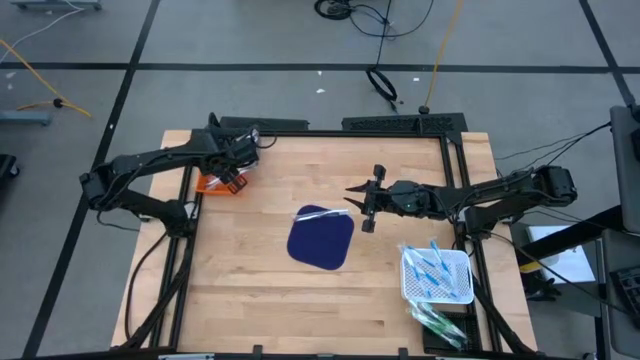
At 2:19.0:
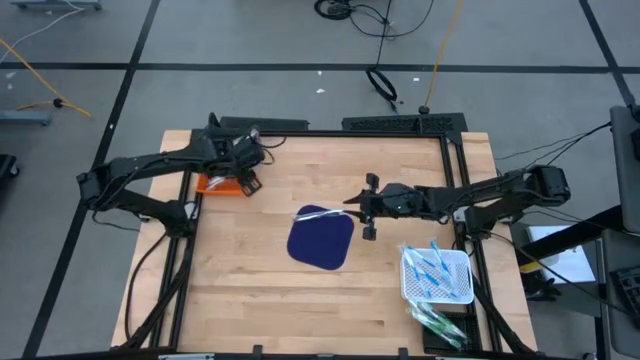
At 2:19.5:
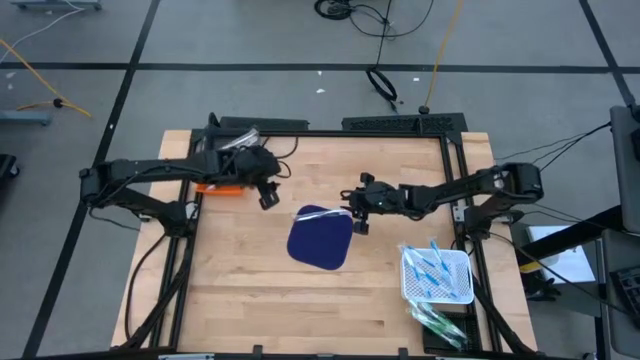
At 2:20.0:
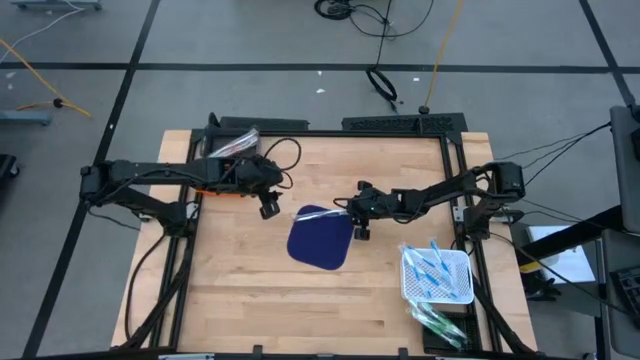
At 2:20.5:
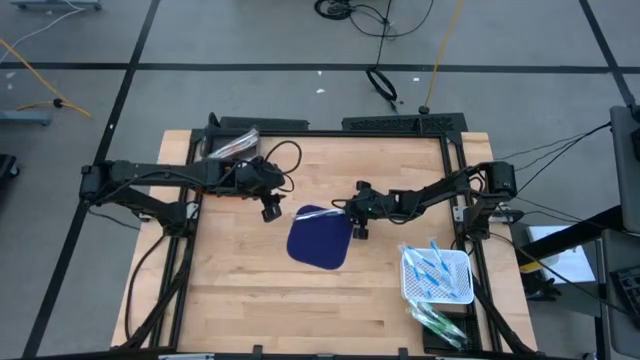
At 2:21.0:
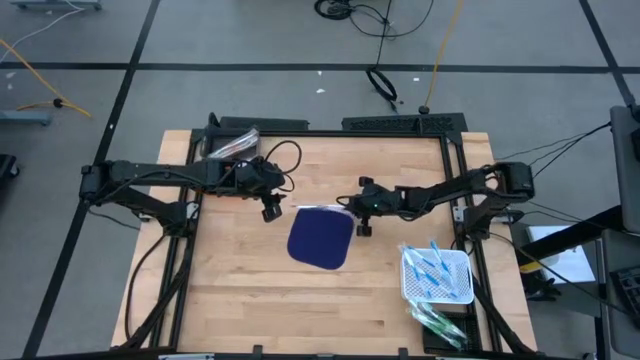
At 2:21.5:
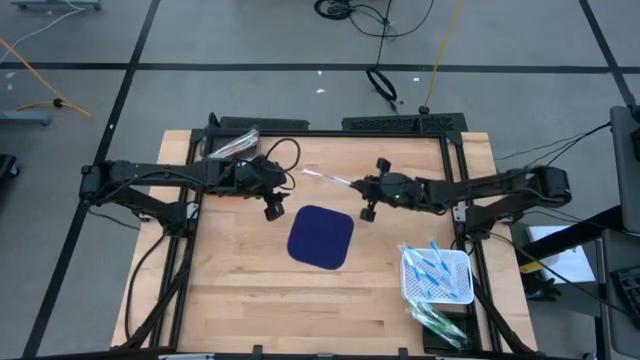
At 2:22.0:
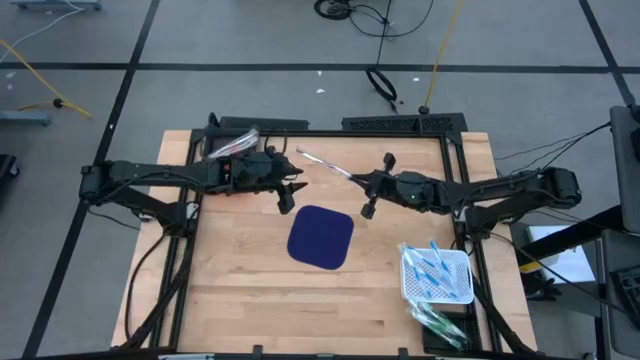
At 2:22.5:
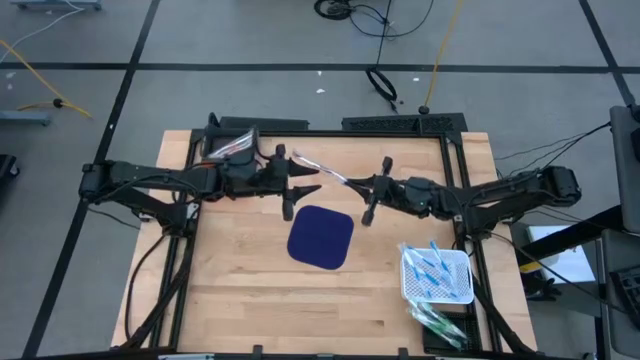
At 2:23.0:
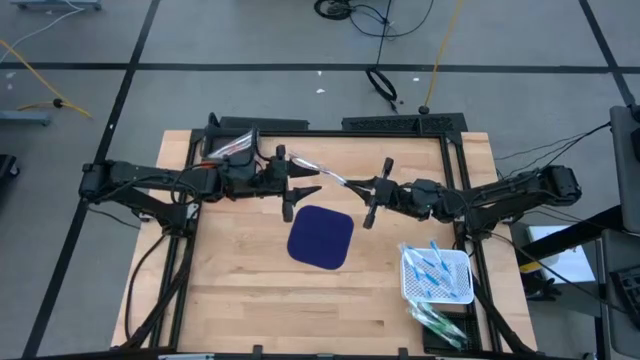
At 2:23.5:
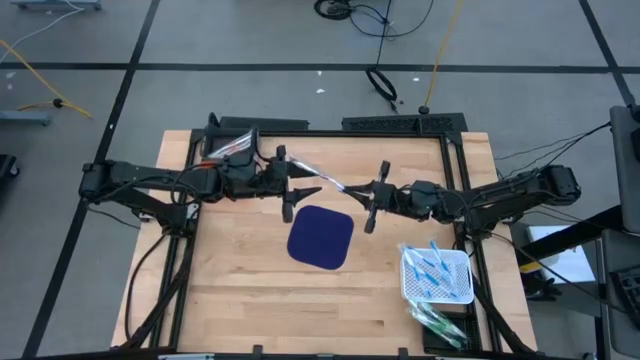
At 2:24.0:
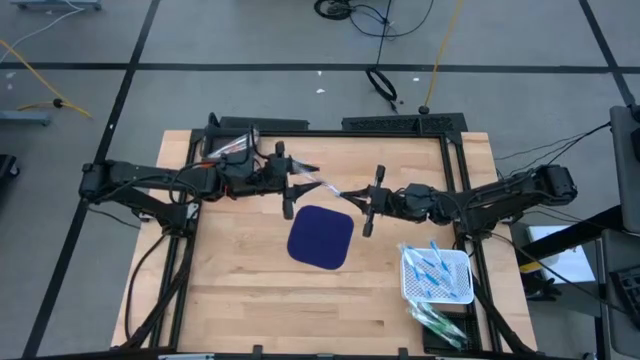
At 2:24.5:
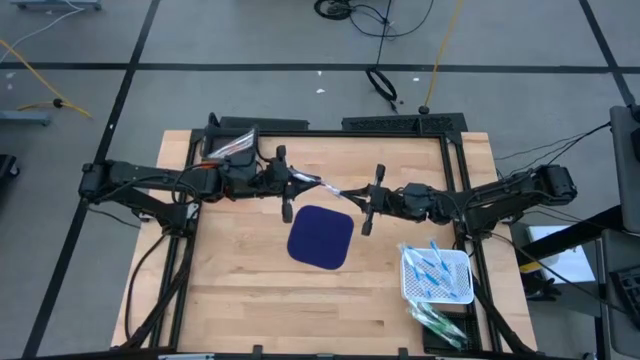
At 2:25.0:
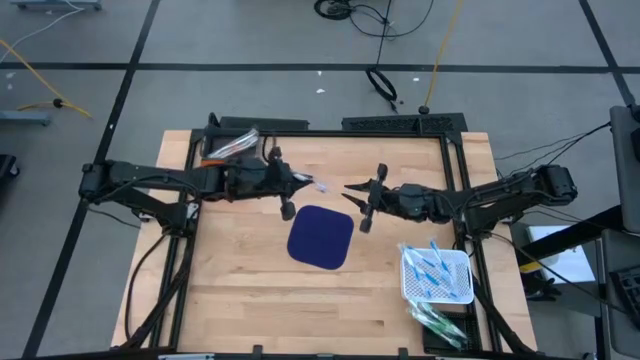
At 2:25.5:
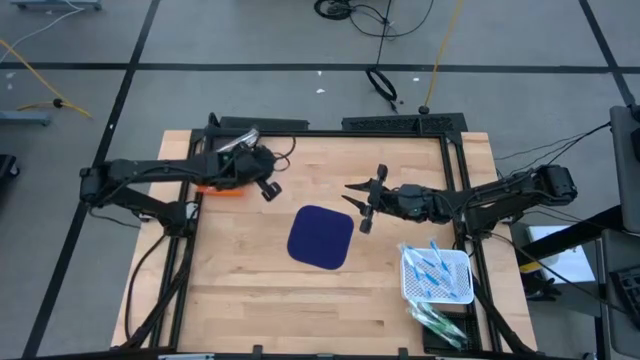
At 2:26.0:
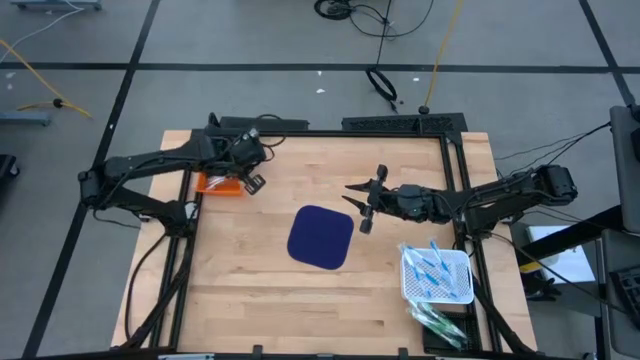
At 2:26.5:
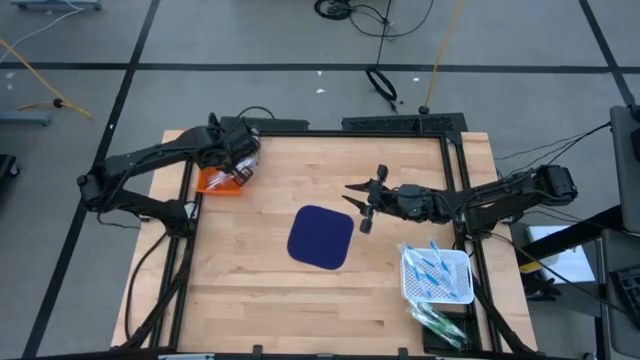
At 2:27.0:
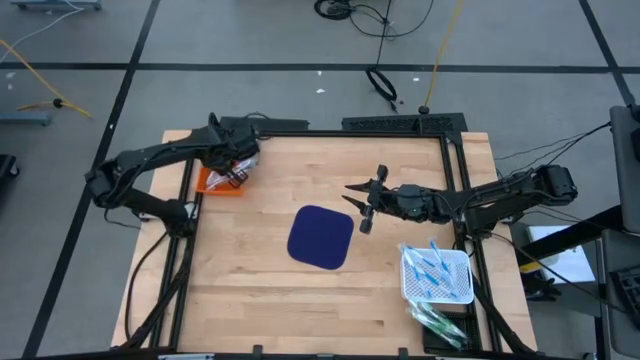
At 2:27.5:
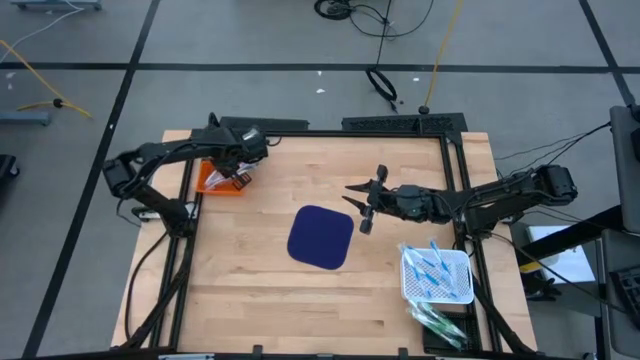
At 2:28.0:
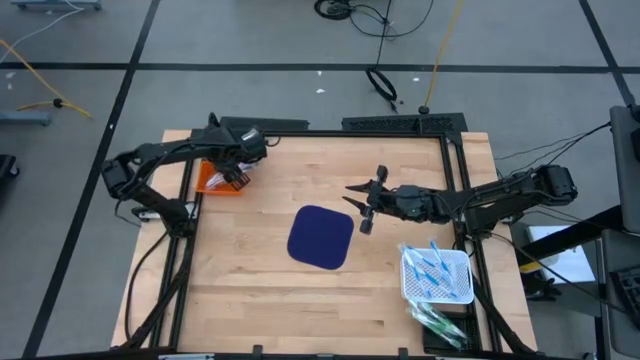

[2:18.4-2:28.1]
Task: Pick & Place Toothbrushes
Put the purple toothbrush into the orange bin

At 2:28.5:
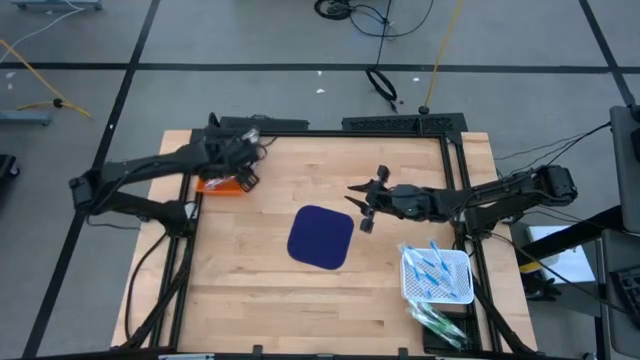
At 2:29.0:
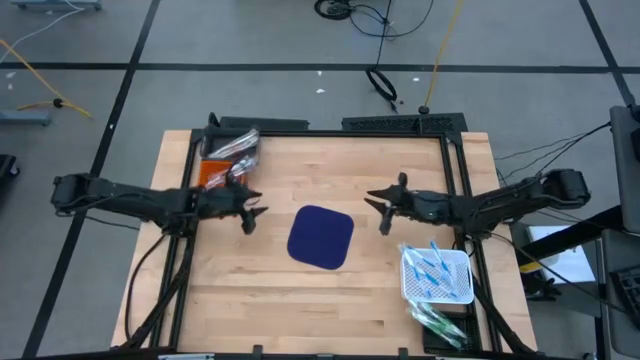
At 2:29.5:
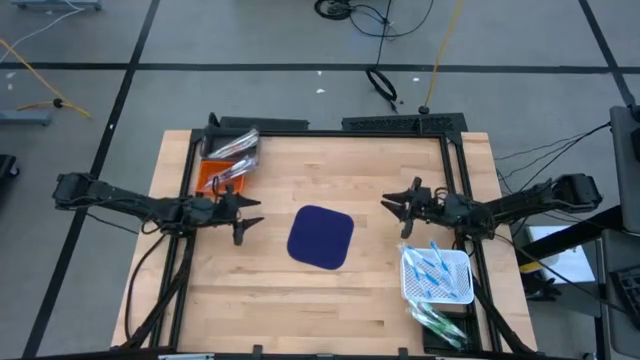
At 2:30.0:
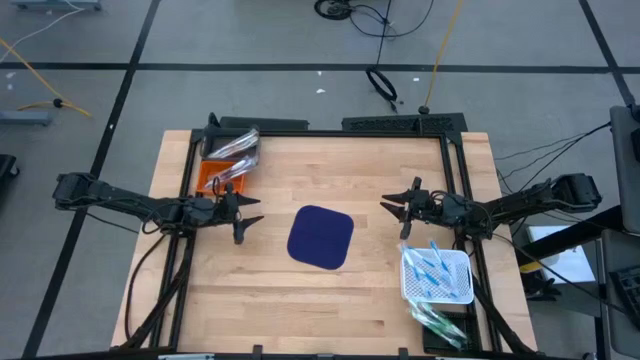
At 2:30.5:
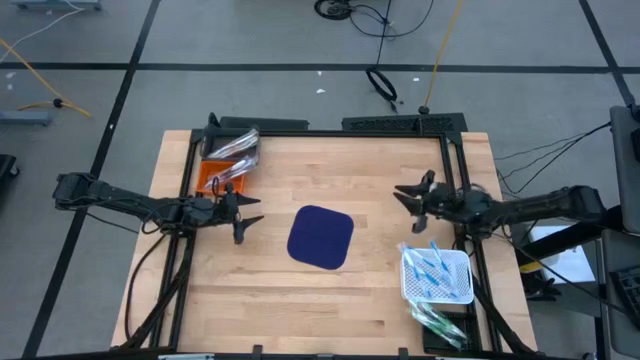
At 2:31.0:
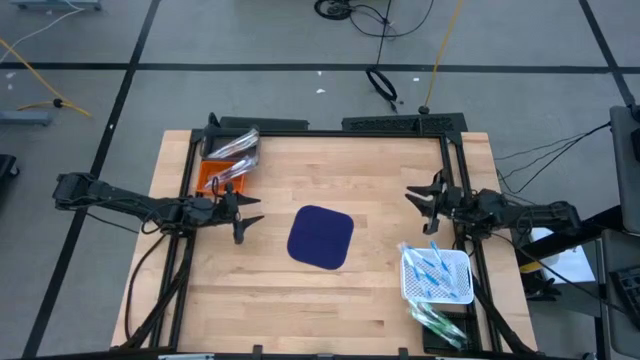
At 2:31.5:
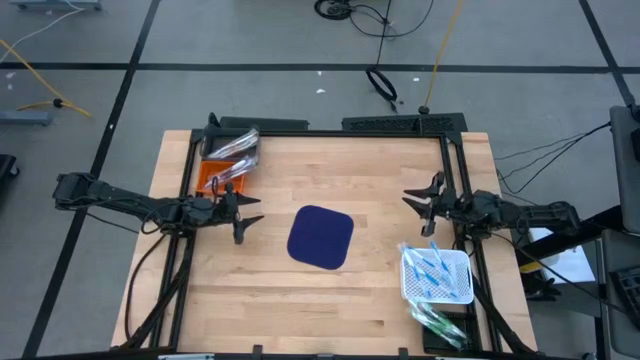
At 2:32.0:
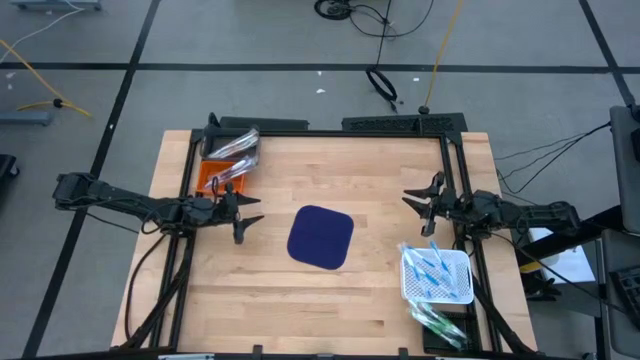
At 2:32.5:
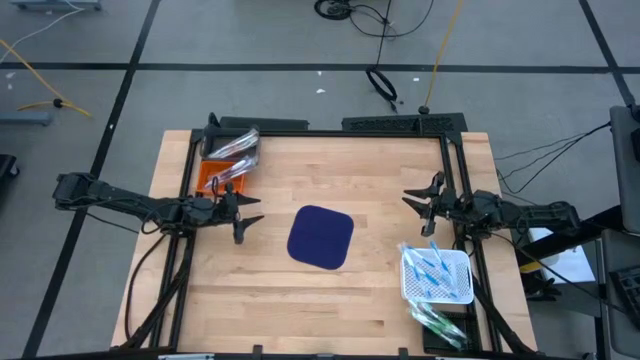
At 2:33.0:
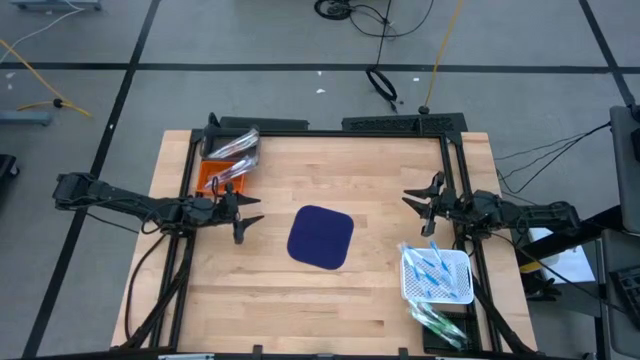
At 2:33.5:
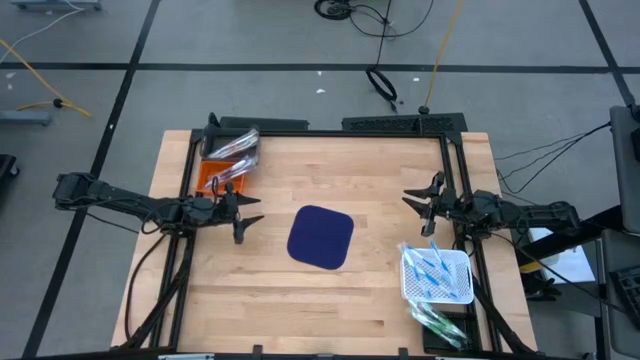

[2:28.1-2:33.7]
Return to Home Position

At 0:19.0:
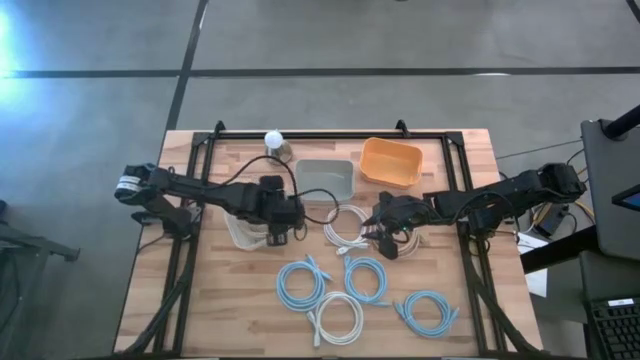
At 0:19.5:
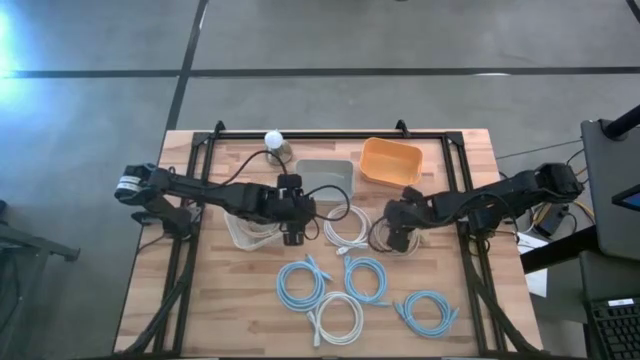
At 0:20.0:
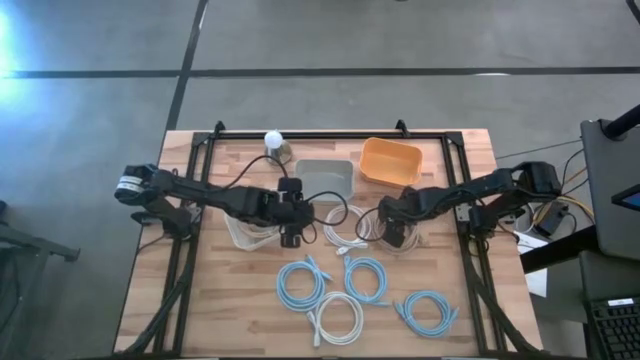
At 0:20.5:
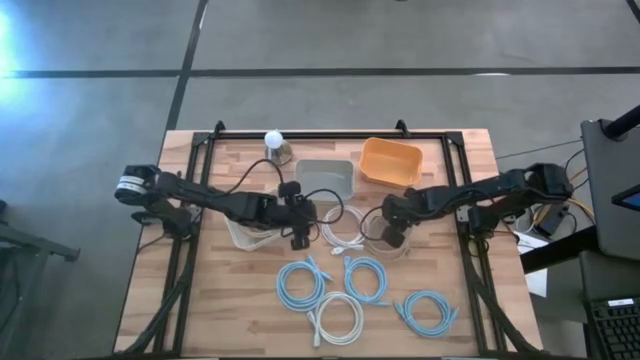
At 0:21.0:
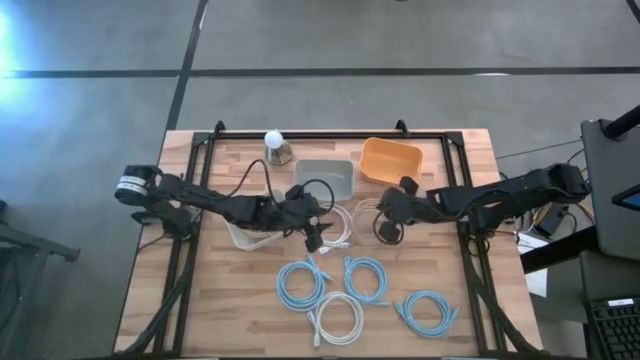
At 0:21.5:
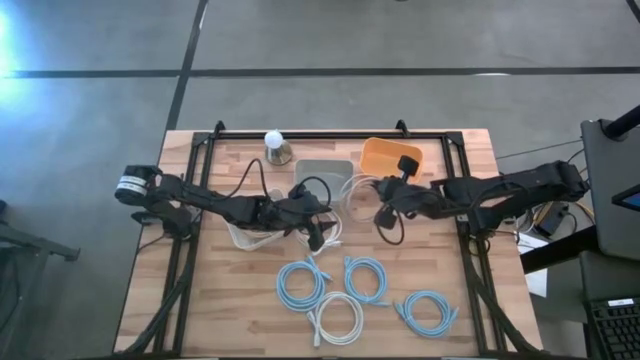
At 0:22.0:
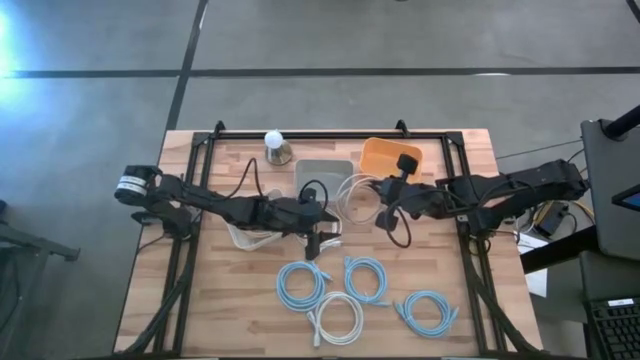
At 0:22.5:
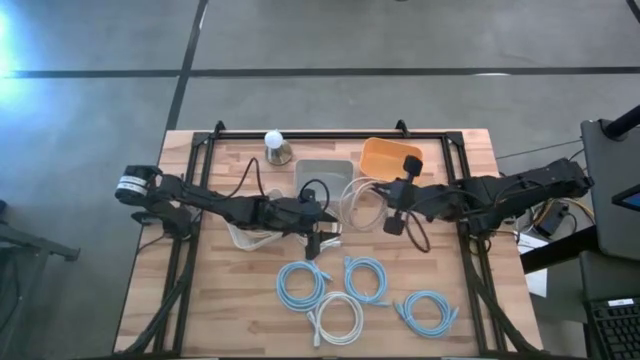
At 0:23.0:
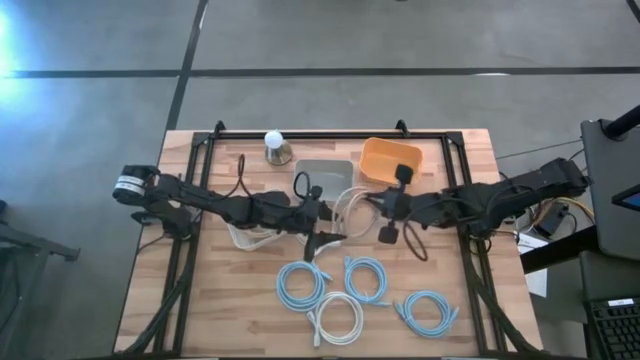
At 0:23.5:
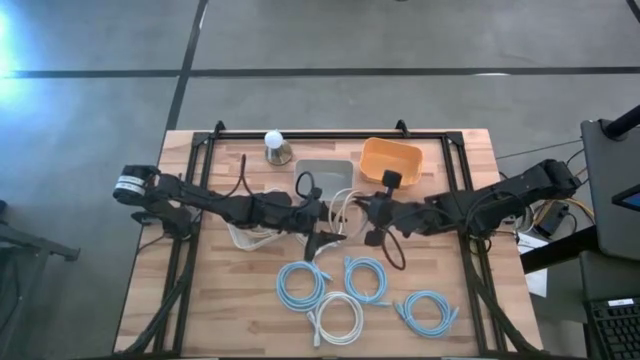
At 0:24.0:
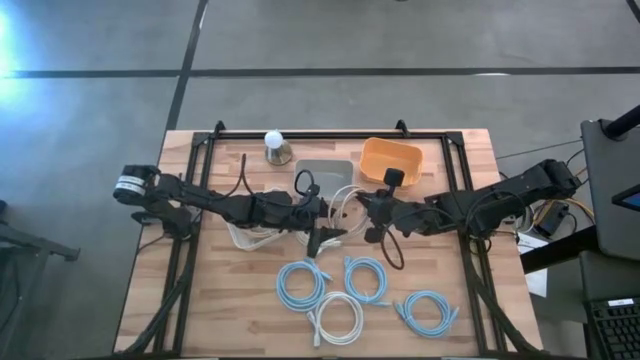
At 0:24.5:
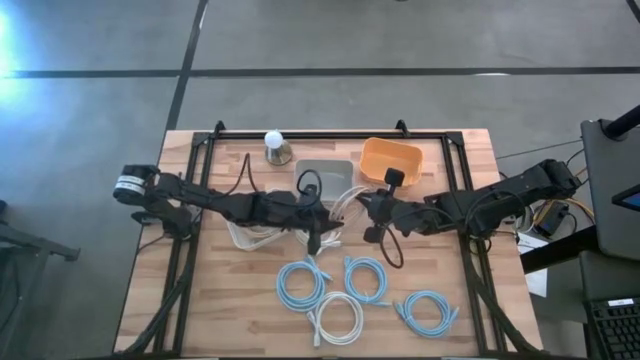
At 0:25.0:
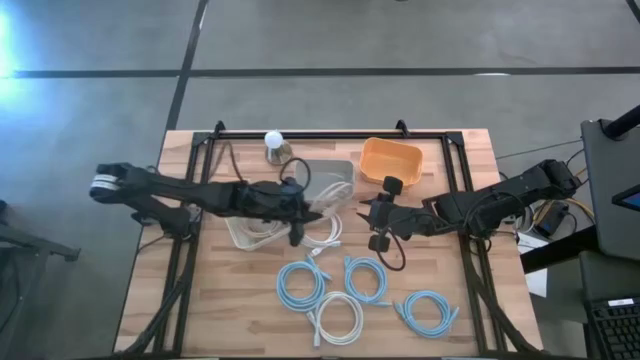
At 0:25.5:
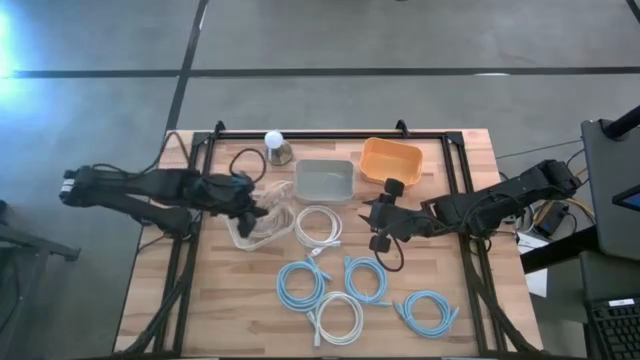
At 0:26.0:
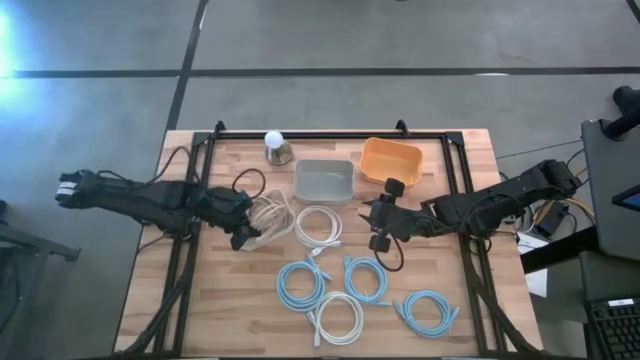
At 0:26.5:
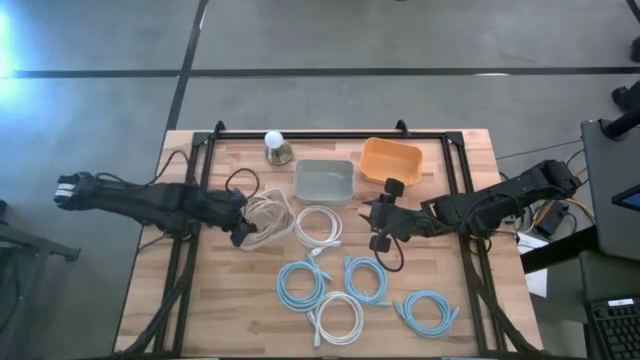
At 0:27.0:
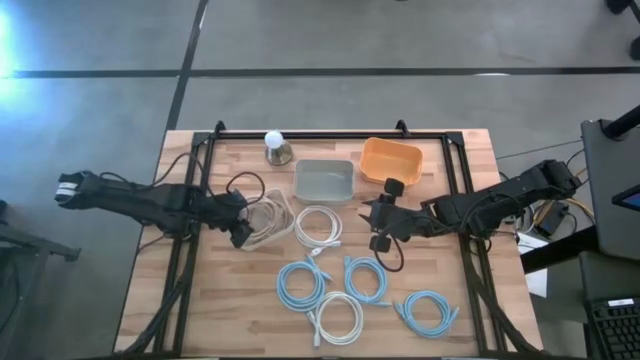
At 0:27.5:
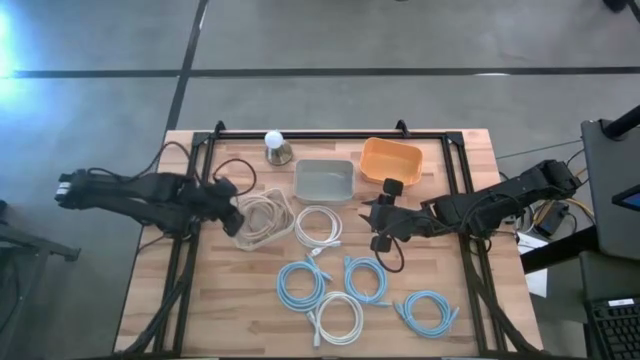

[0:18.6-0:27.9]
Task: Sort HDMI cables
Put the brown HDMI cable into the white bin
